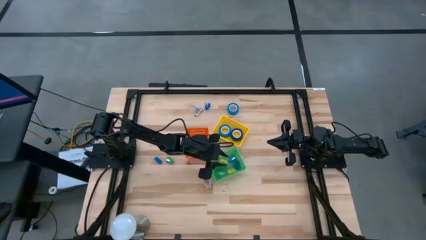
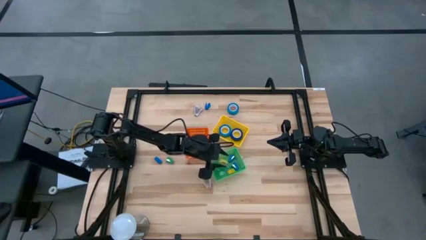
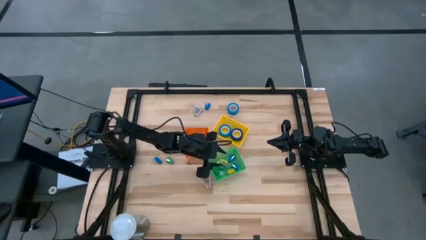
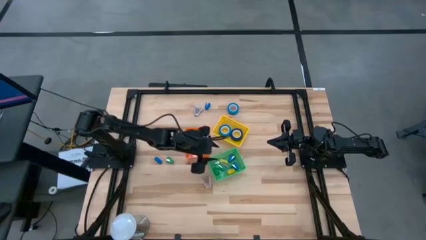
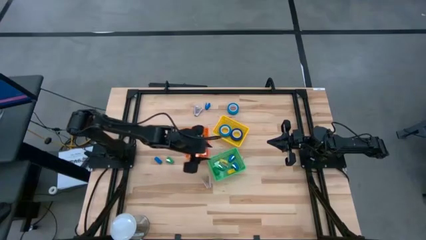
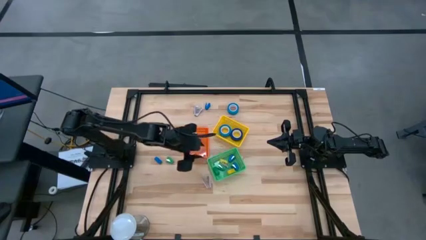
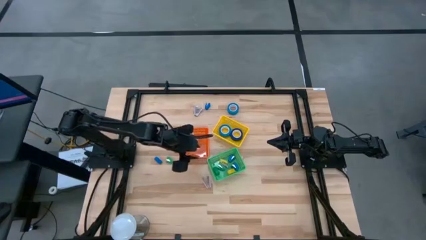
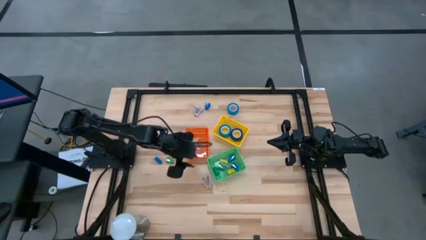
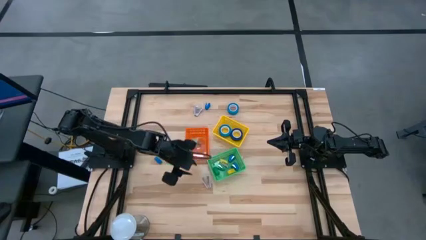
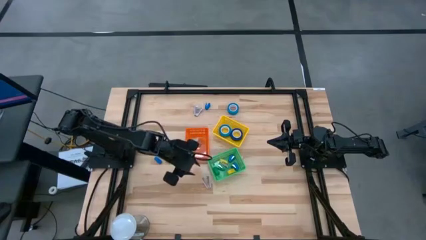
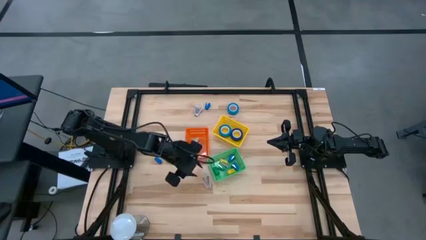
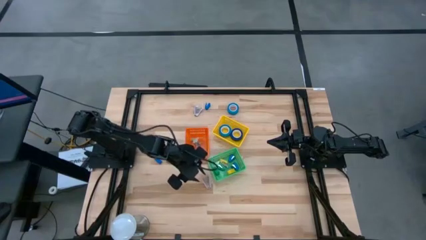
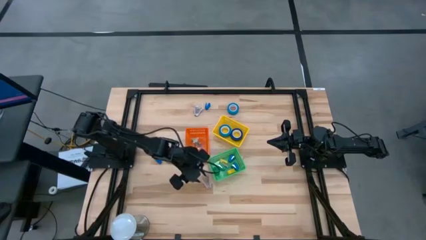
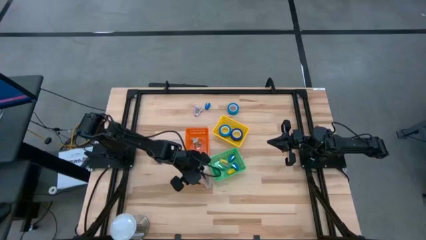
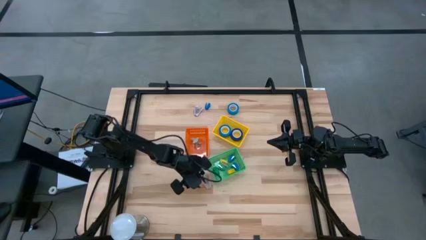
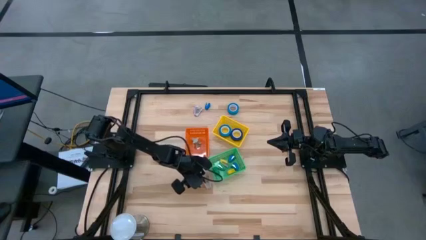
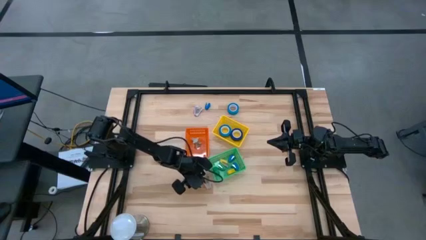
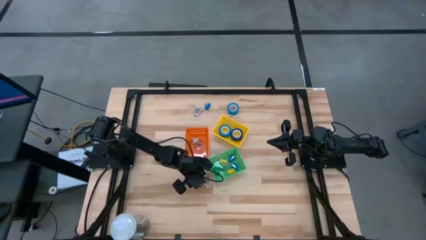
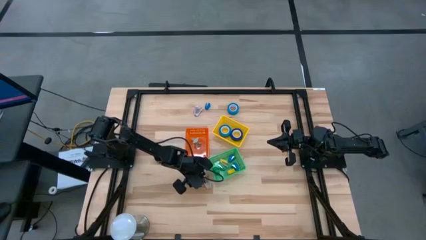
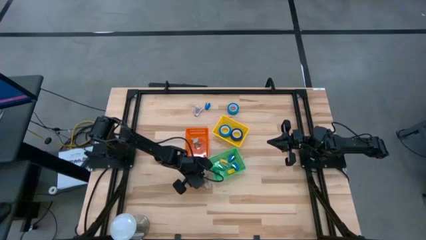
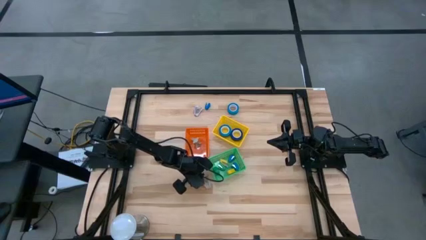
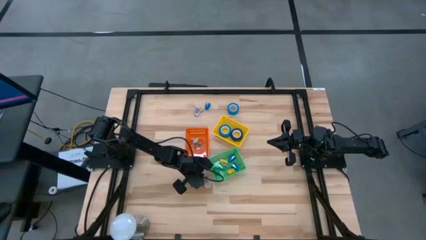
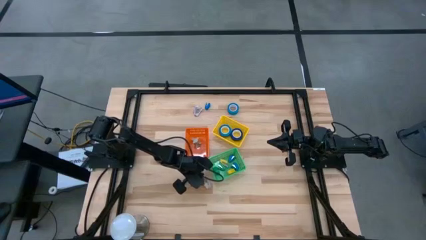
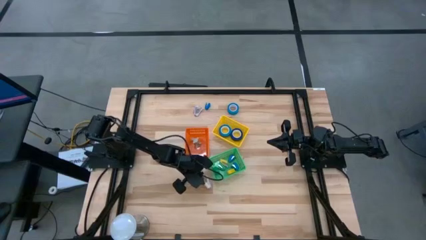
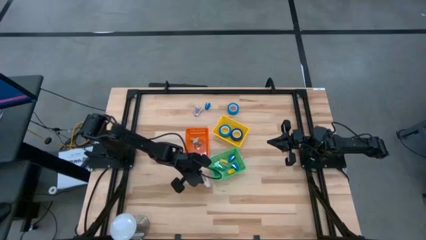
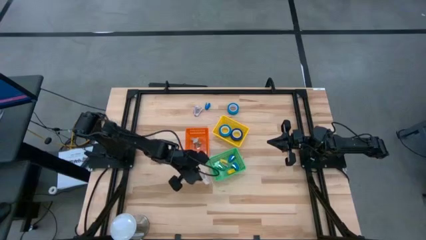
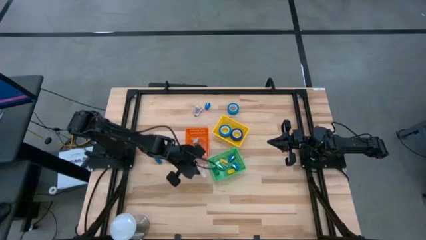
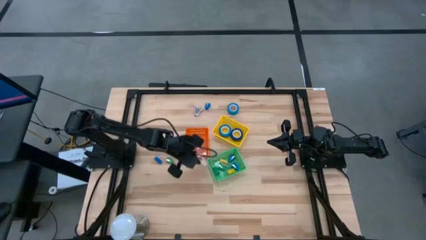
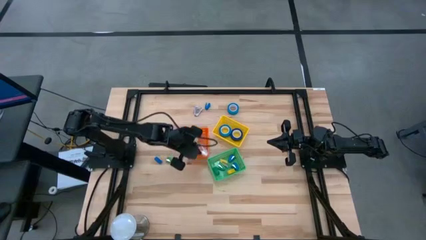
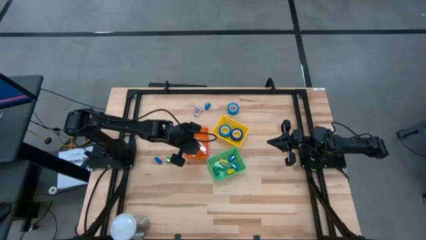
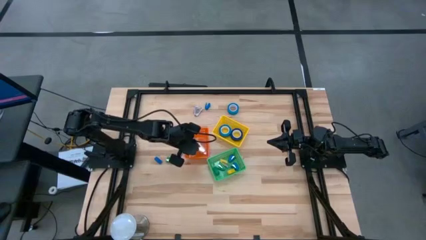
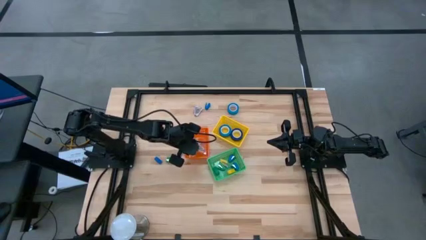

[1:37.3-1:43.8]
Task: Pick and place Stapler, Stapler remover, tape
Put the pink stapler remover into the orange bin

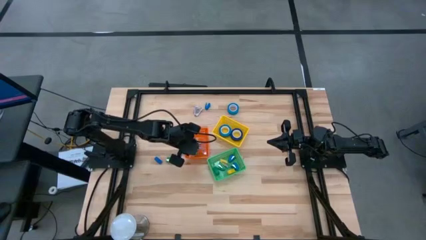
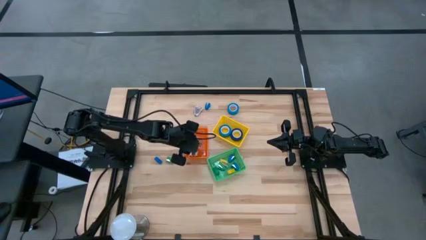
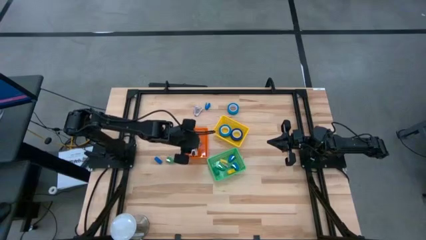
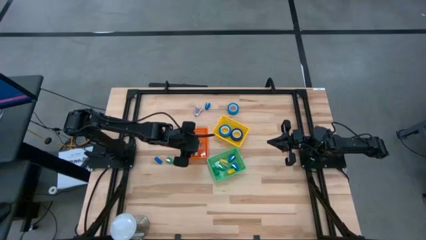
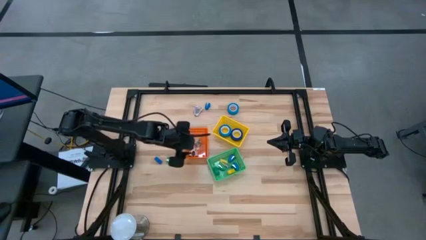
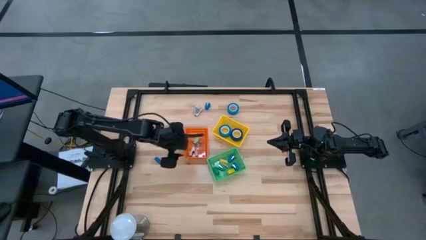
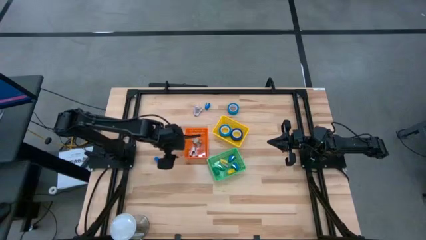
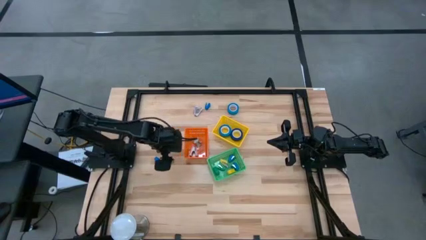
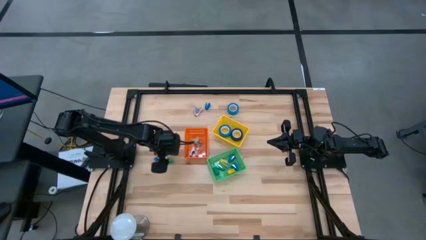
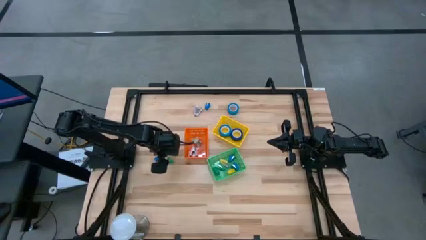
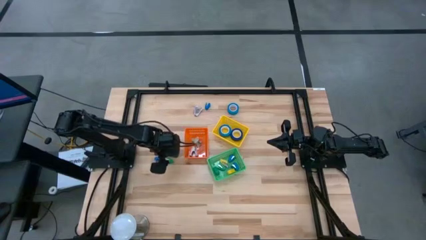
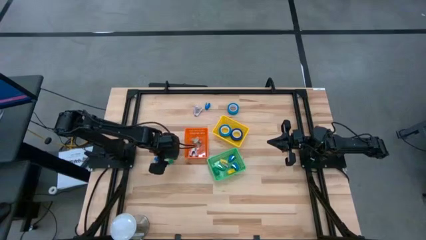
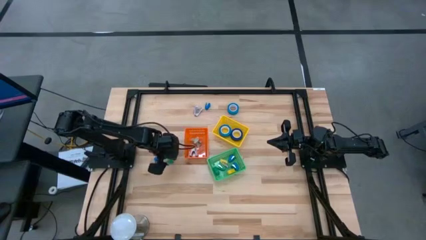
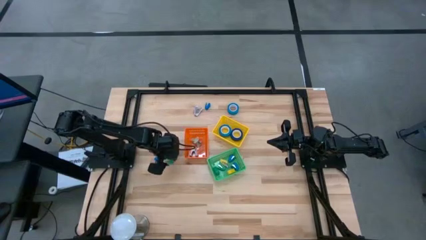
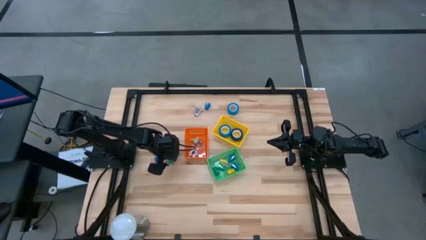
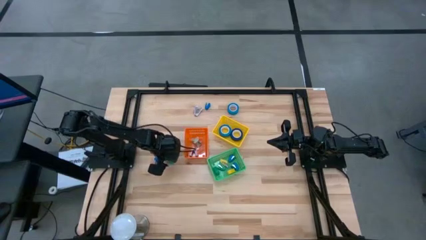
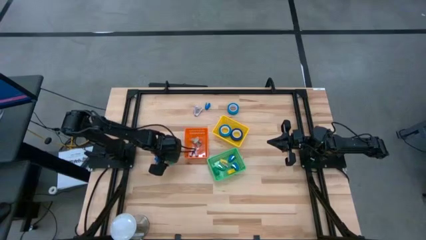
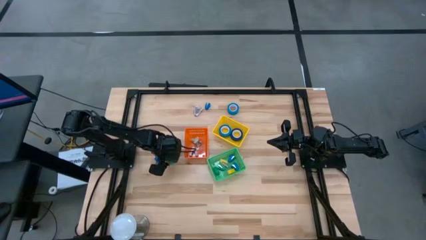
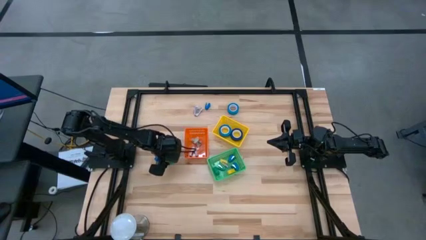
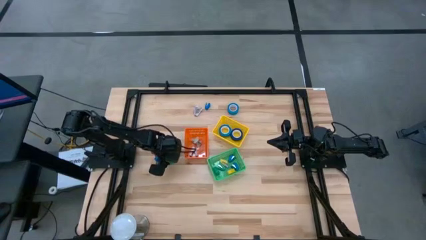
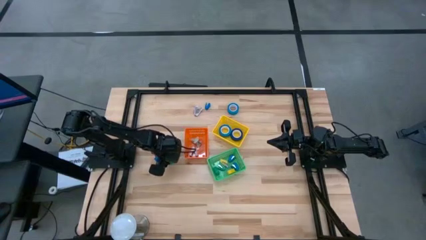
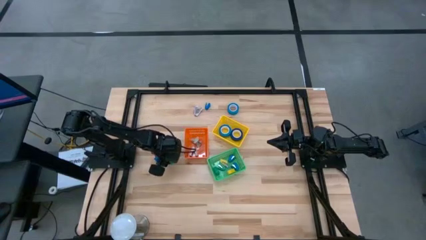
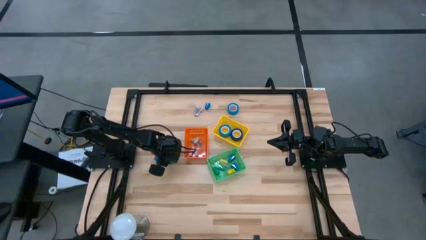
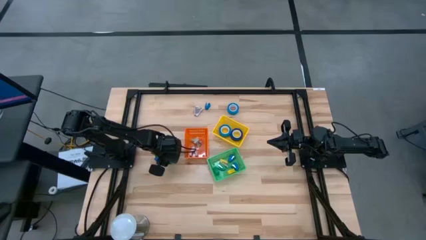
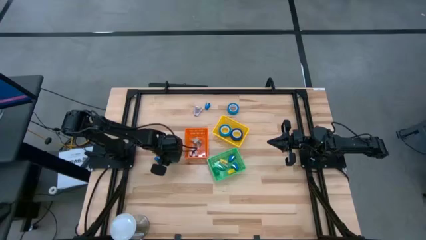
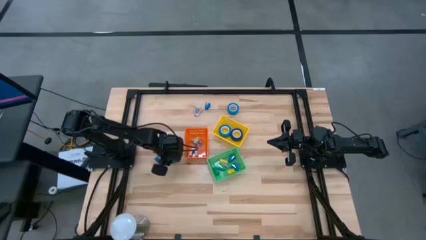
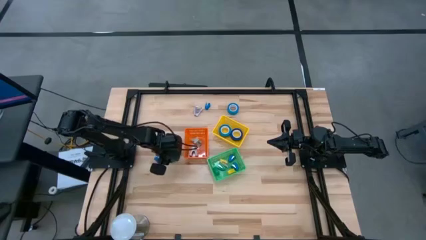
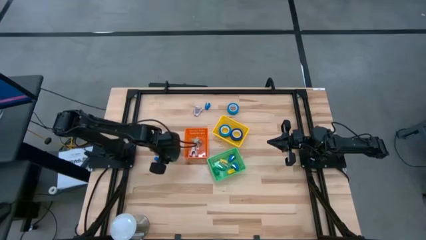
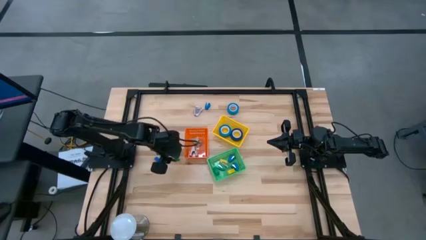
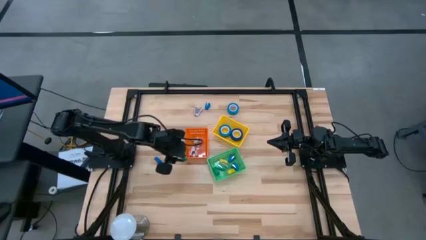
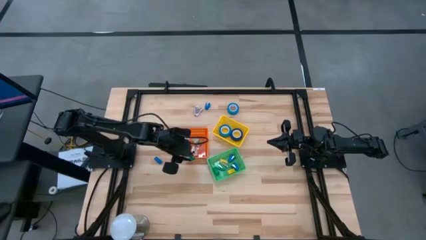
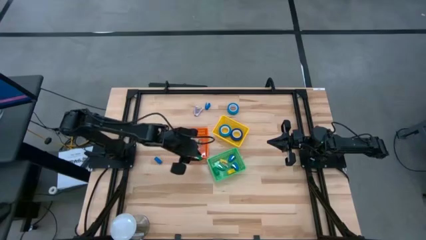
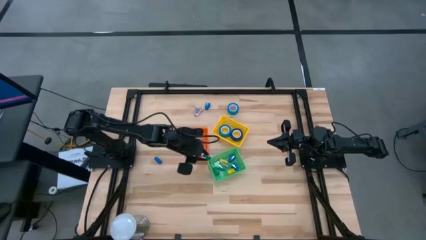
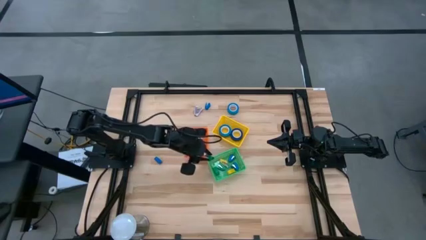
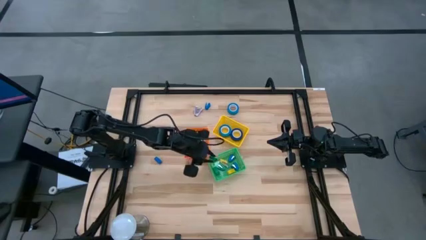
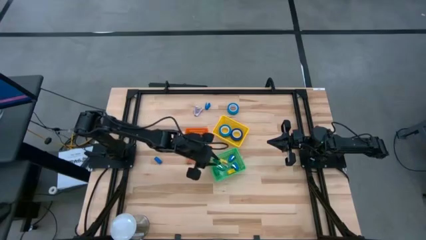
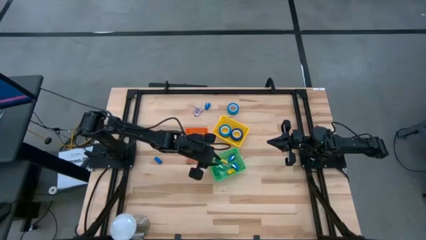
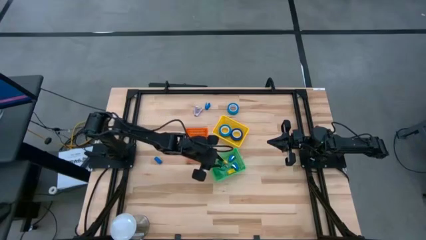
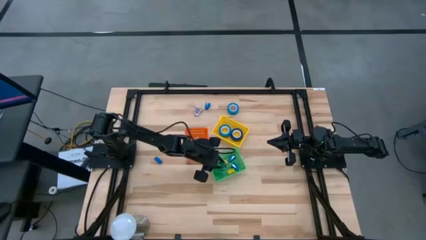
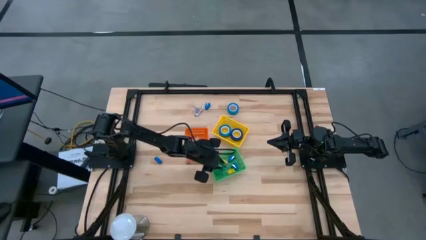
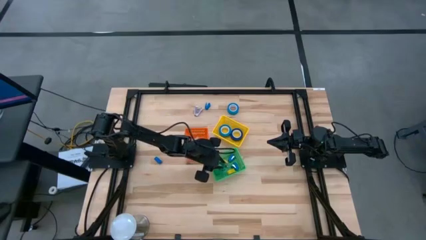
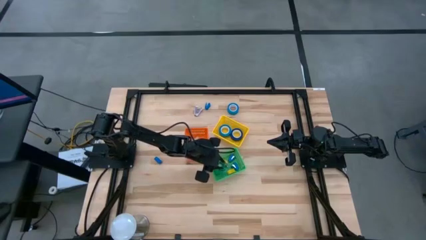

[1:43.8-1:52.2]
Put the green stapler into the green bin
